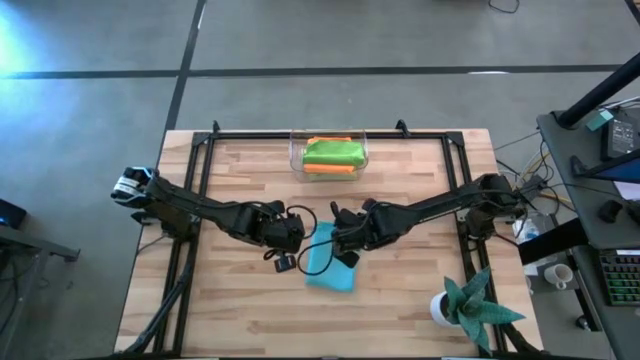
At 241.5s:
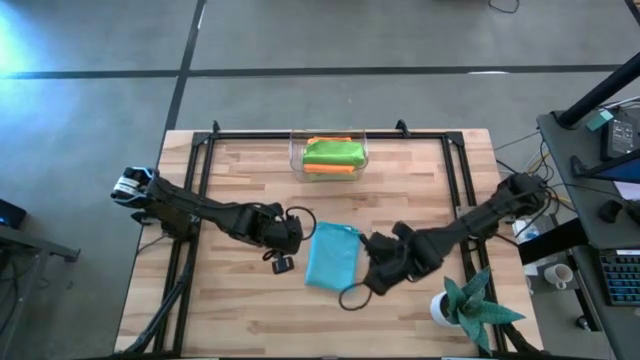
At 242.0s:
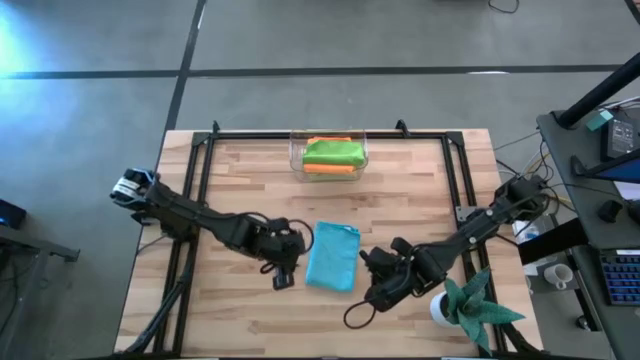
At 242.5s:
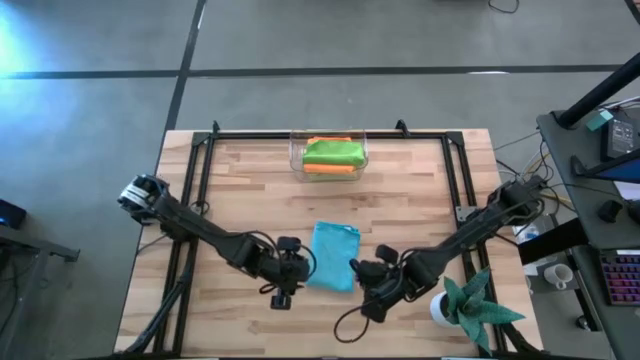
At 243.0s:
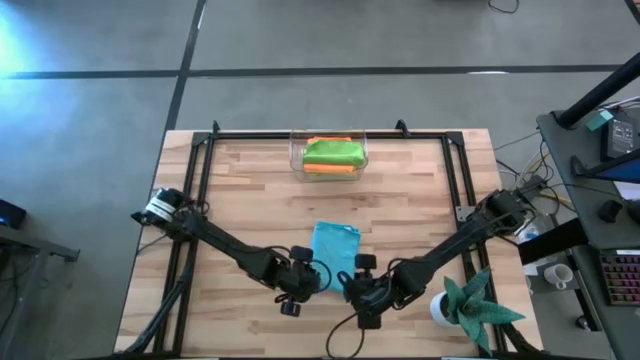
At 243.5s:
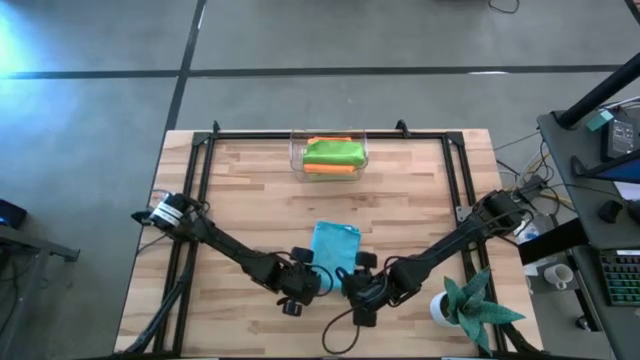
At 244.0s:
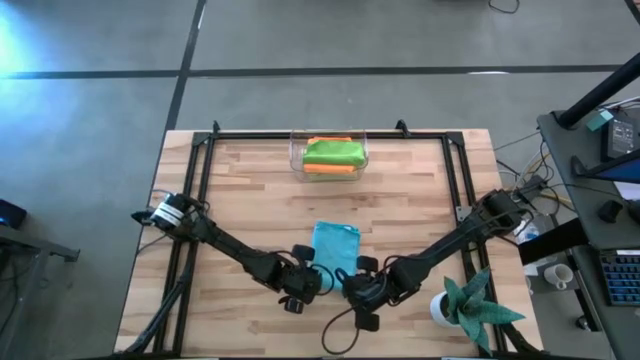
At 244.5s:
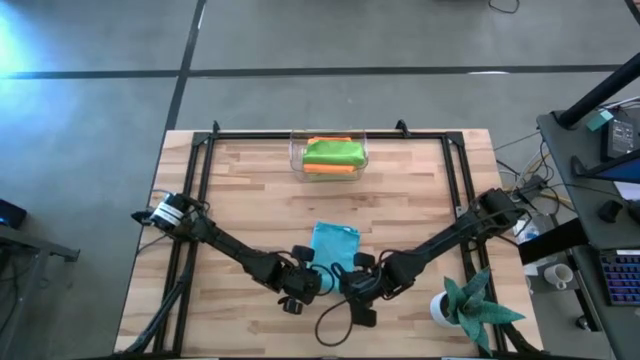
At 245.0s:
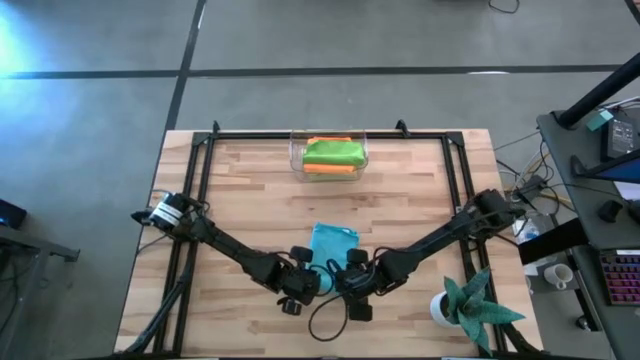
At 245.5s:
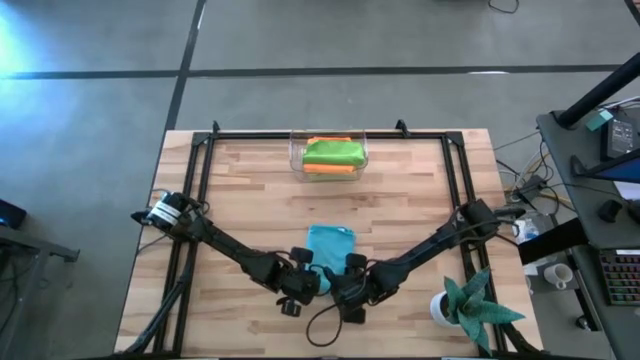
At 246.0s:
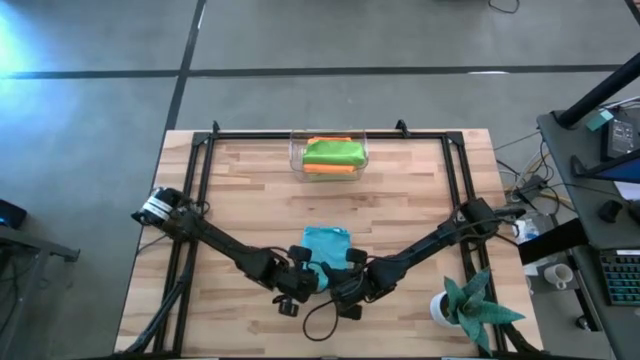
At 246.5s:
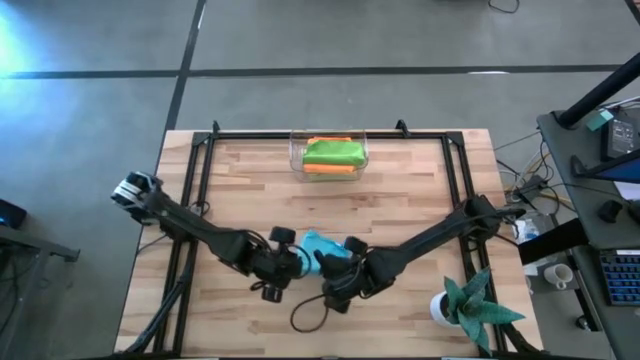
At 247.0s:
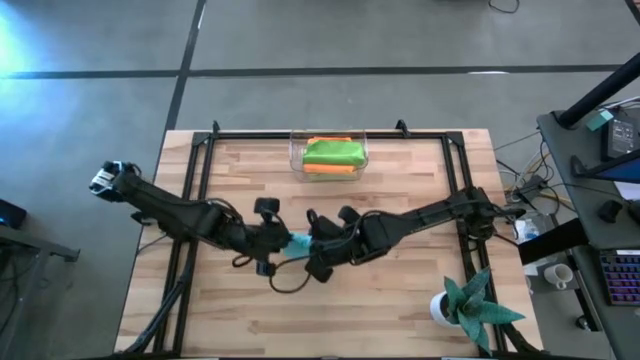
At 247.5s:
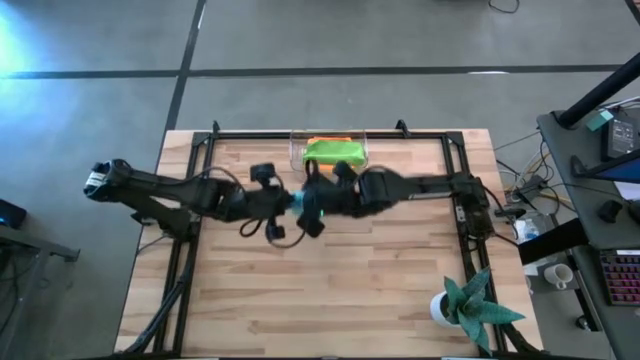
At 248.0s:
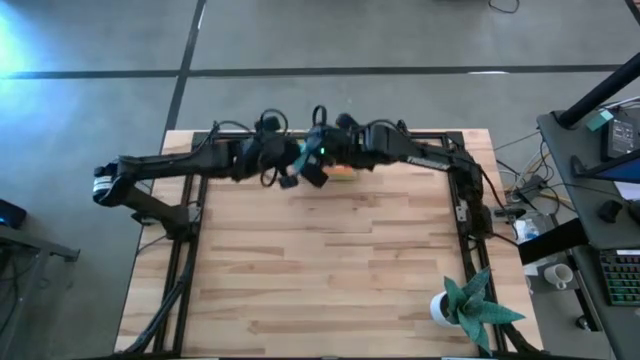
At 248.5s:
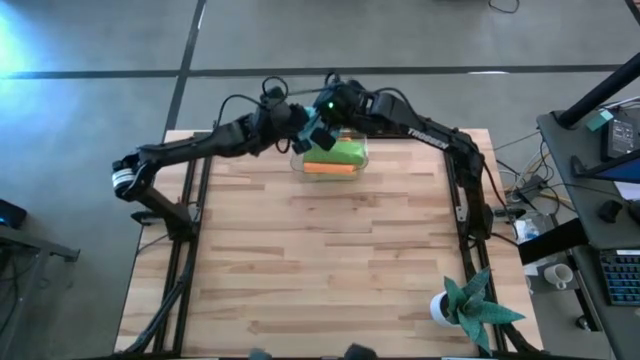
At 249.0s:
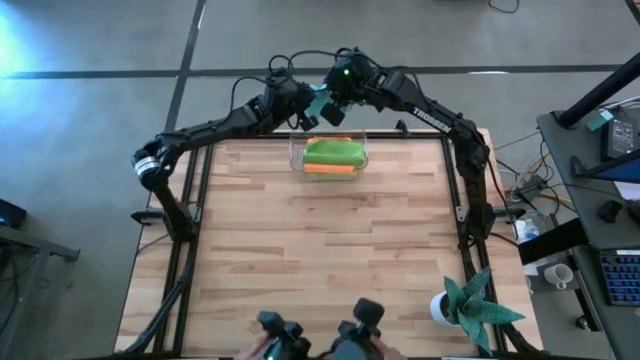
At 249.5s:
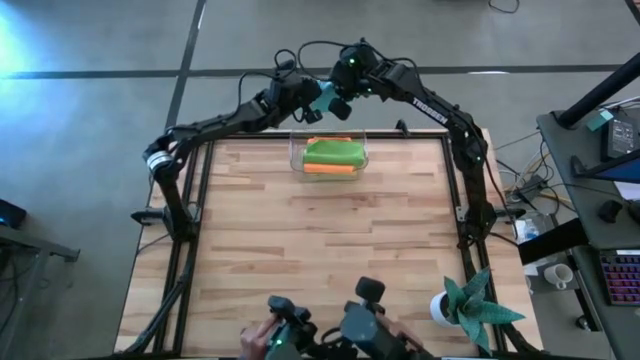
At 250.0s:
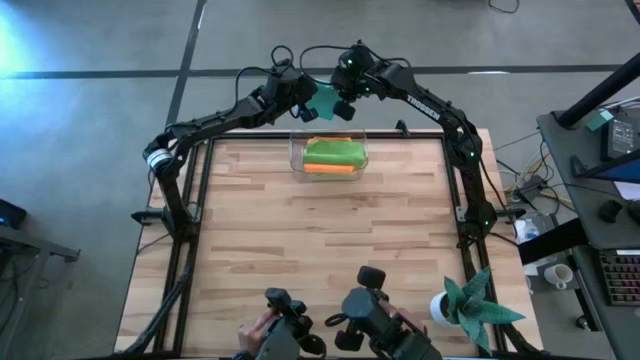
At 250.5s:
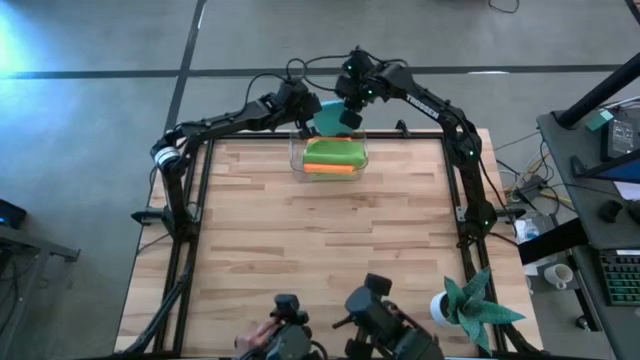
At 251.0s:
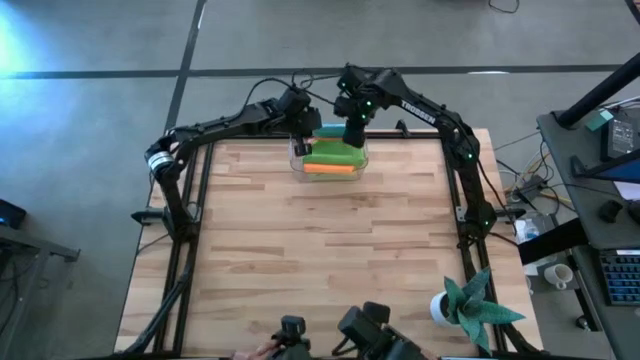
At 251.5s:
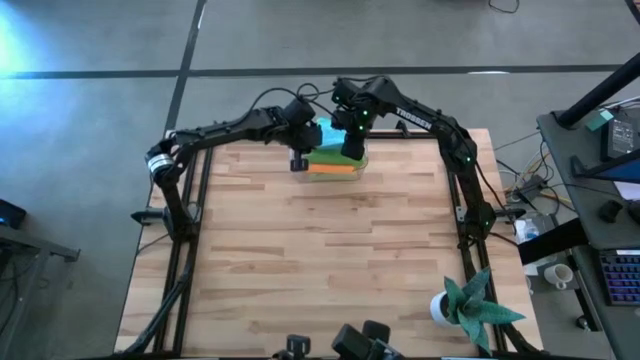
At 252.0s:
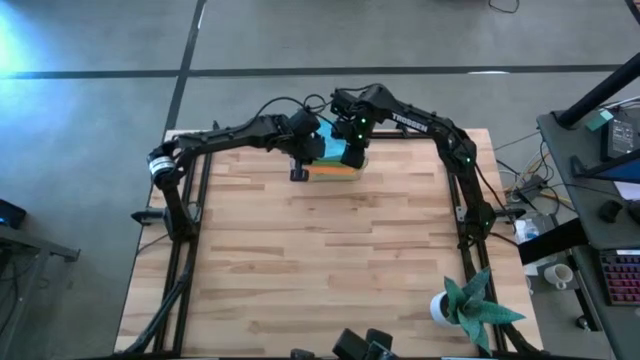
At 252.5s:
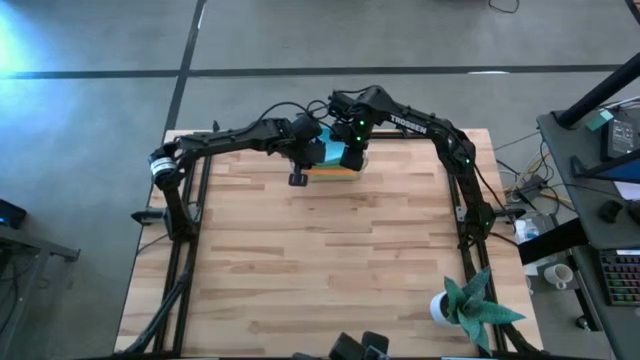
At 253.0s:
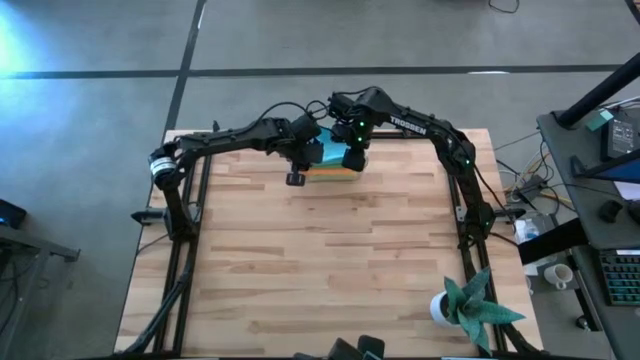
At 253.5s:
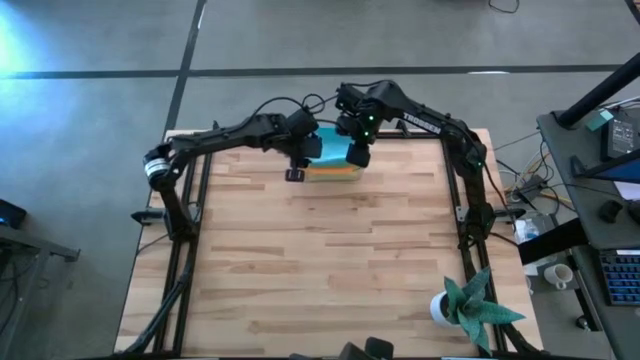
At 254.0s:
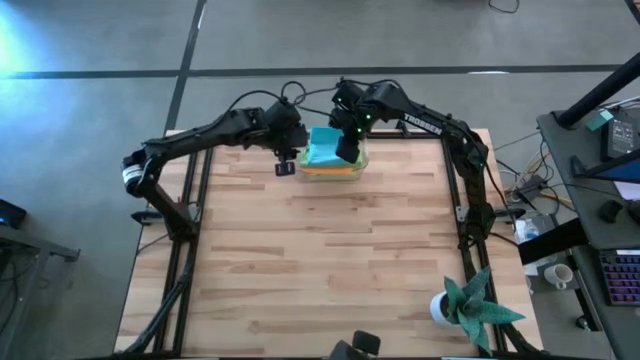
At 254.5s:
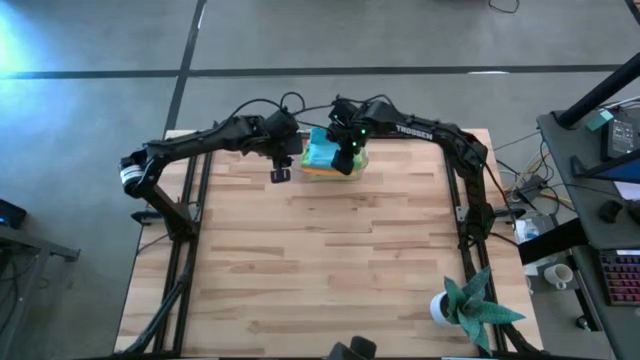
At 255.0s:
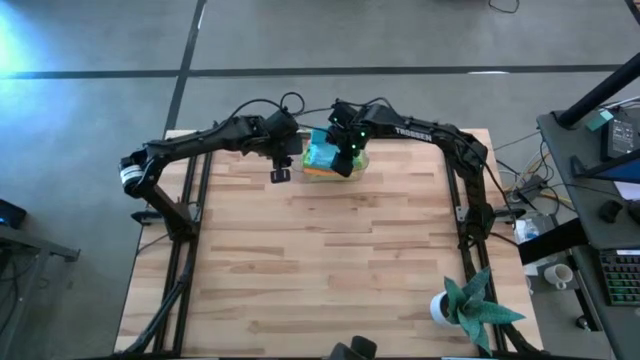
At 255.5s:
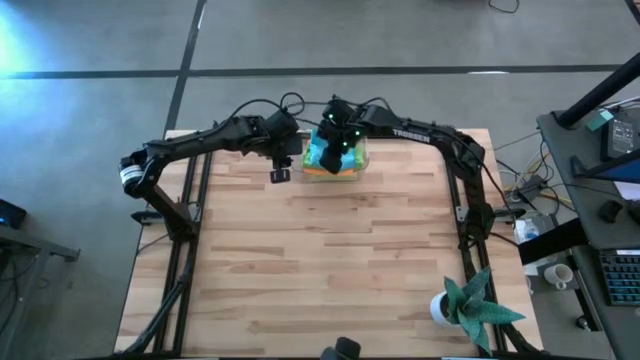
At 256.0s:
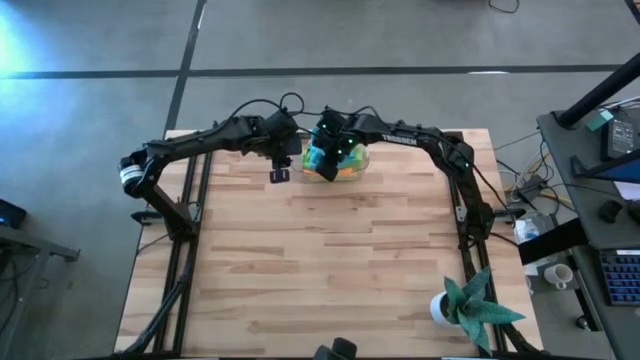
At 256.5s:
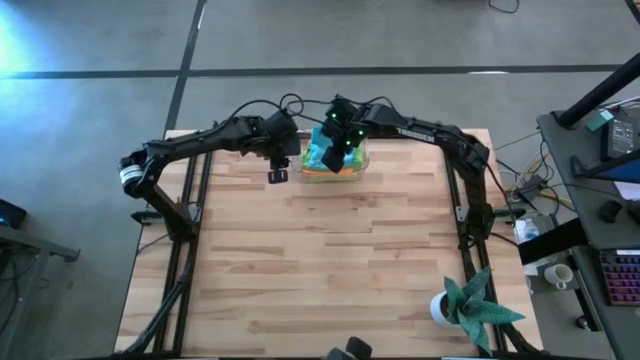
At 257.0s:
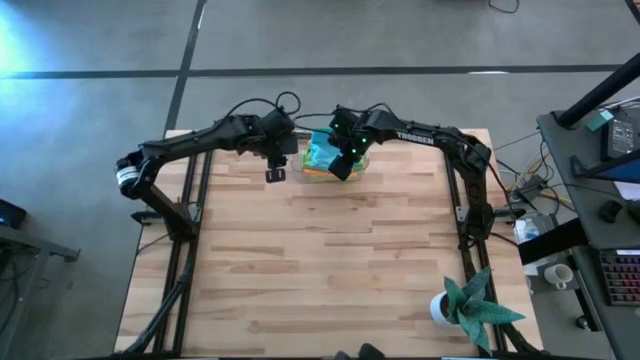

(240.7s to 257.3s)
Task: Fold microfiber towels
Put the blue microfiber towel into the transparent bin

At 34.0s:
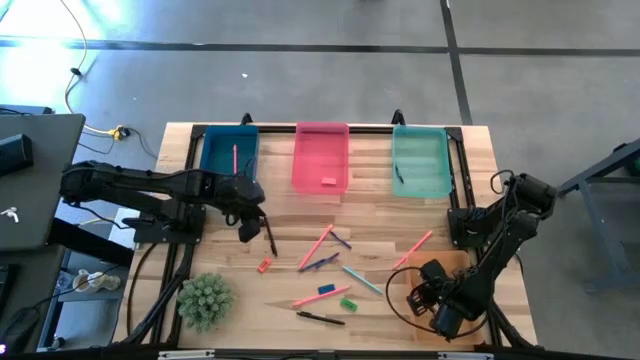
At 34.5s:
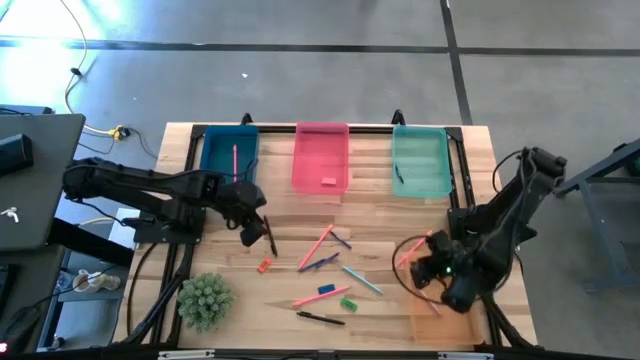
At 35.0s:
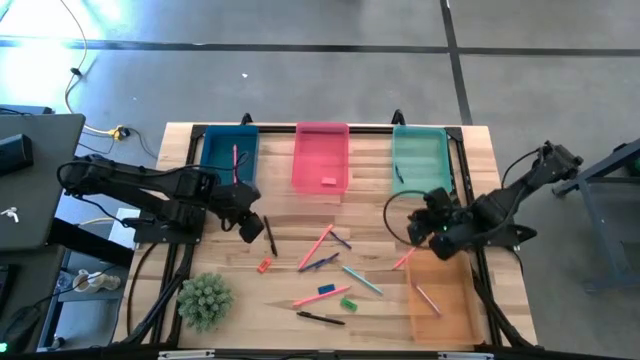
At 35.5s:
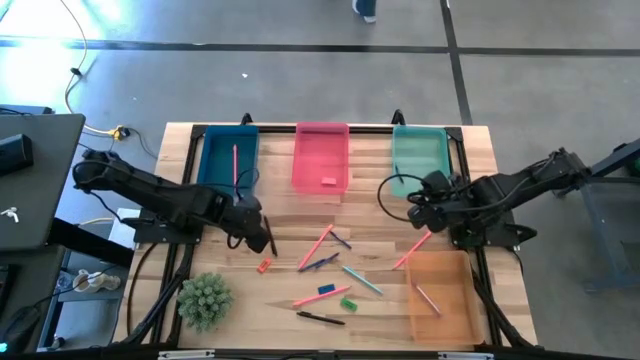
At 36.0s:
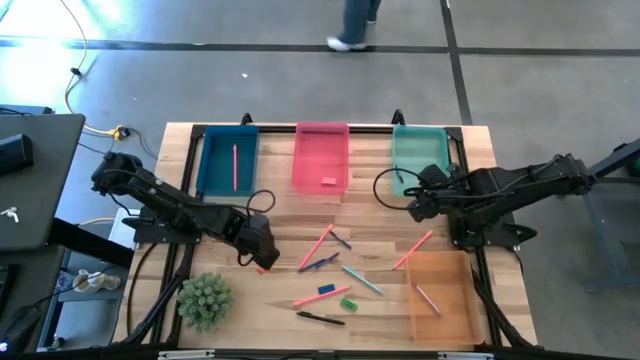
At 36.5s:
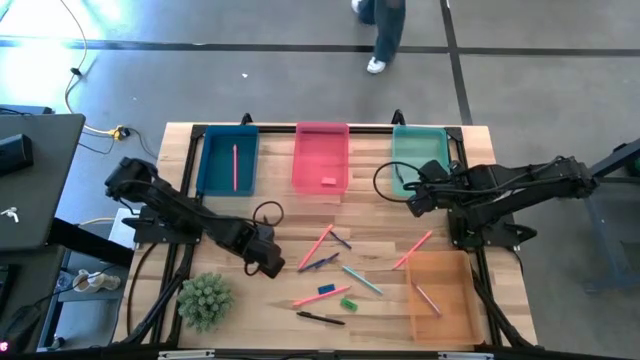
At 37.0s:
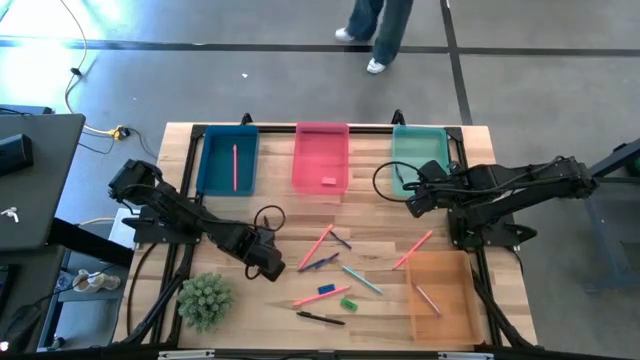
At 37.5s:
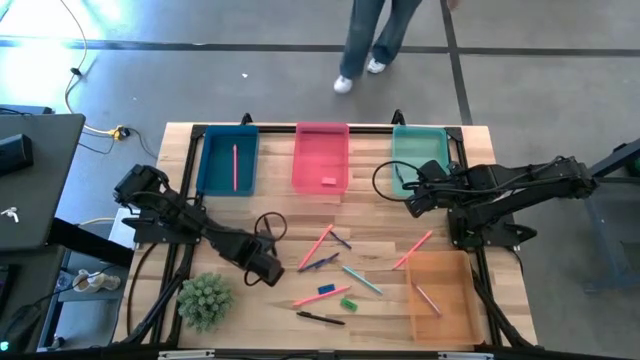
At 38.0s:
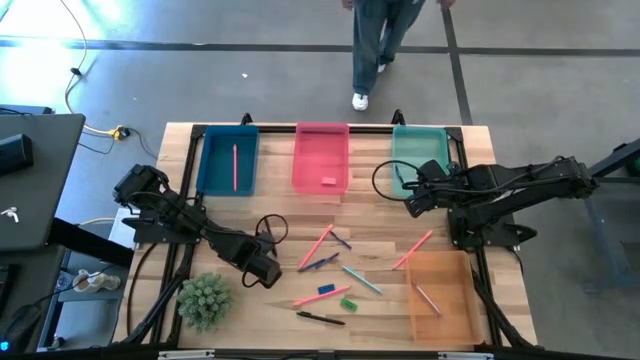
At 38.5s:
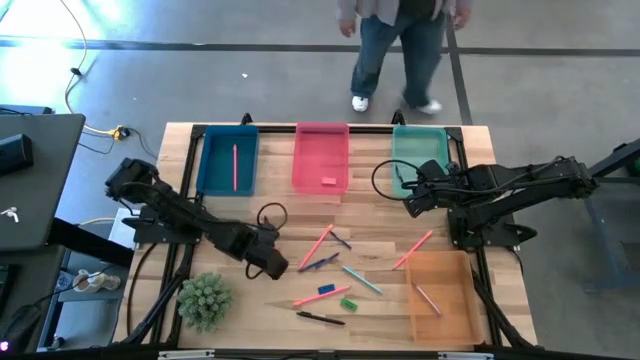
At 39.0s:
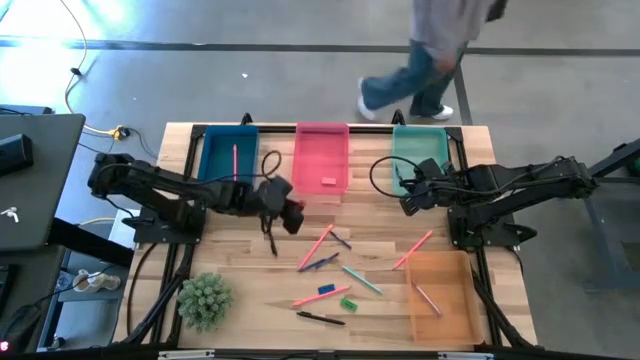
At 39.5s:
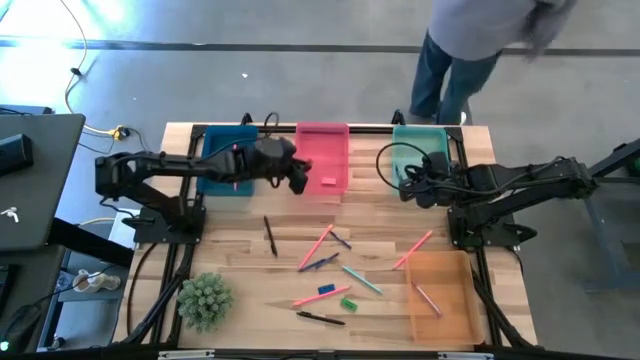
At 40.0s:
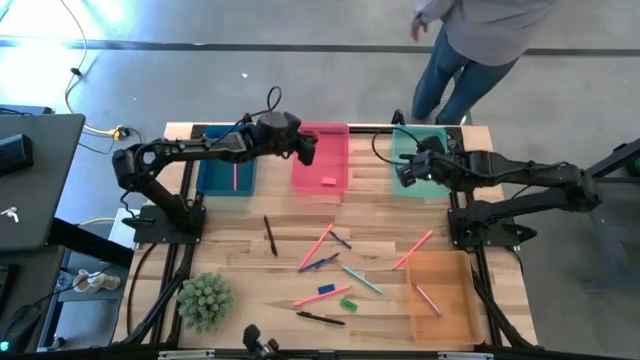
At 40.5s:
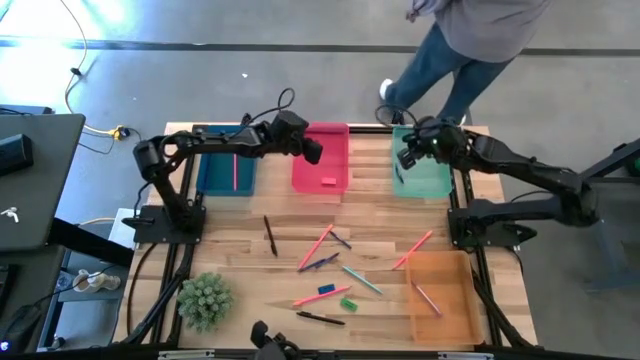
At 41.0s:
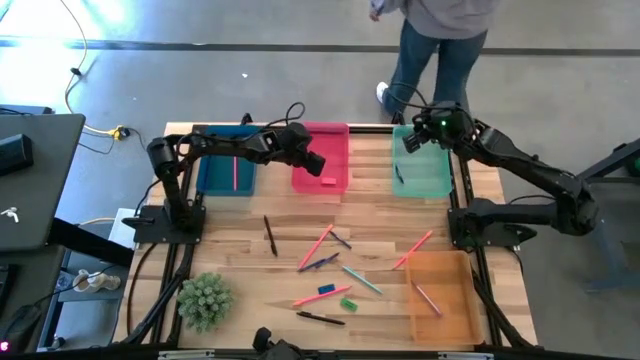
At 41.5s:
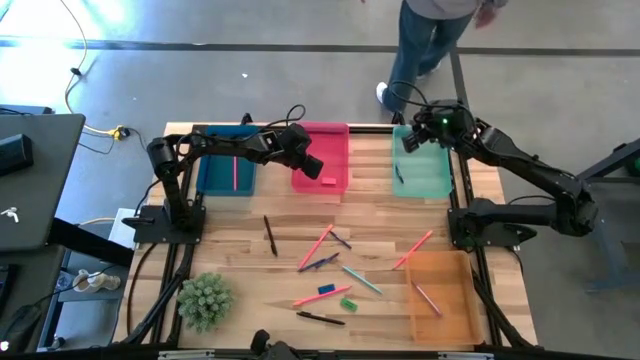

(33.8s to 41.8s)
Task: Sort crayons/erasers/pens/pencils in bins
Put the orange eraser into the pink bin
